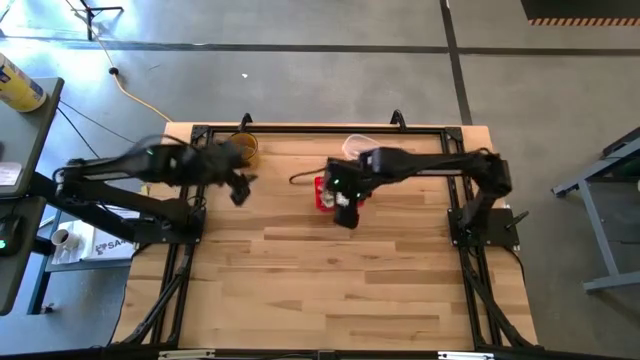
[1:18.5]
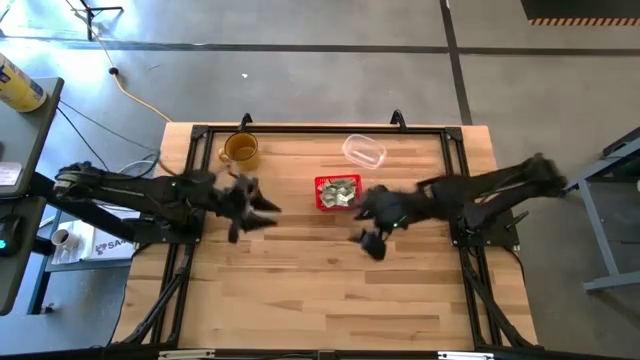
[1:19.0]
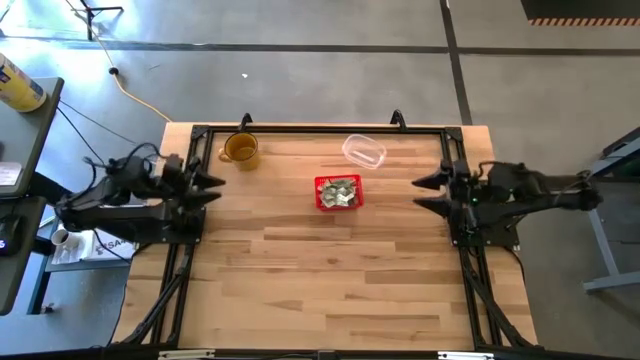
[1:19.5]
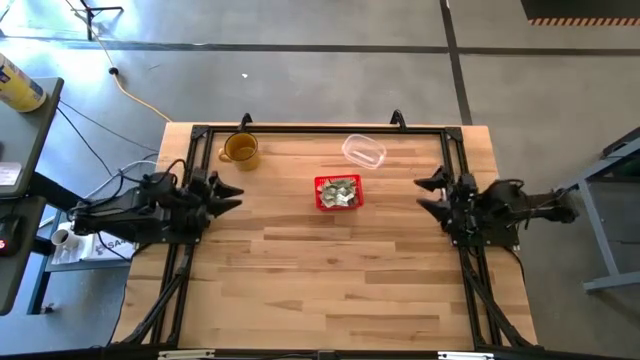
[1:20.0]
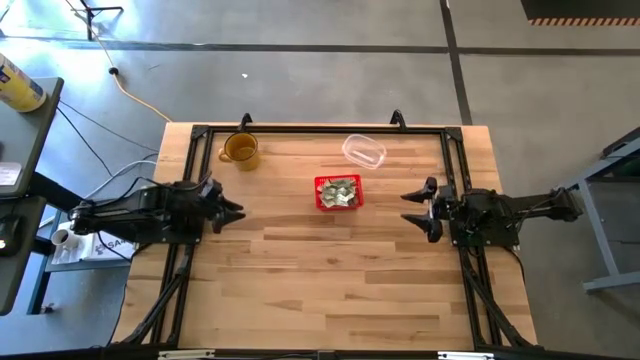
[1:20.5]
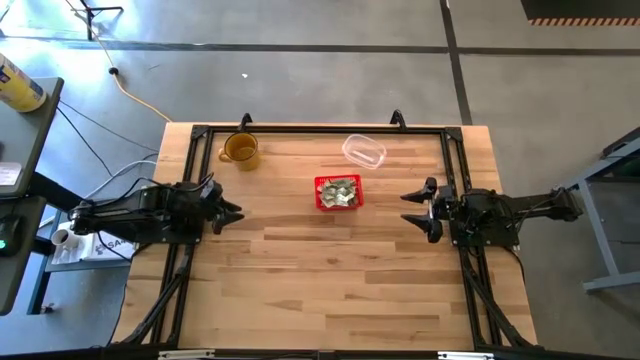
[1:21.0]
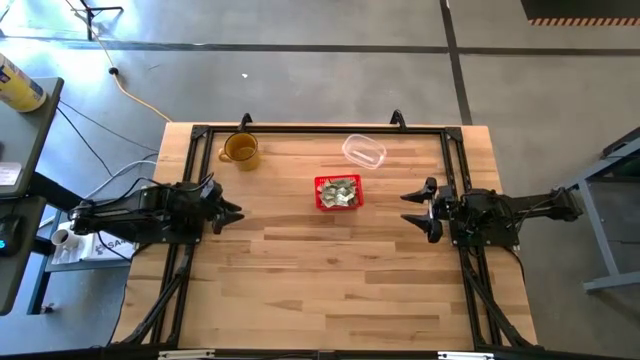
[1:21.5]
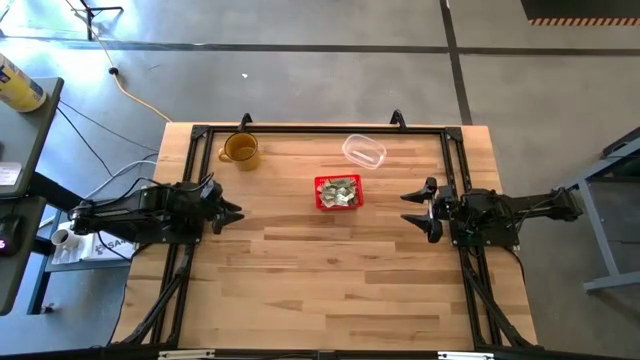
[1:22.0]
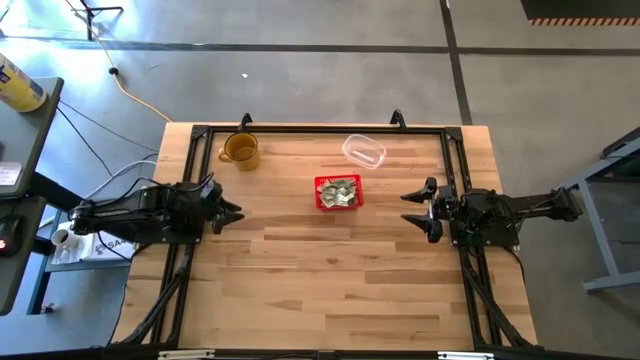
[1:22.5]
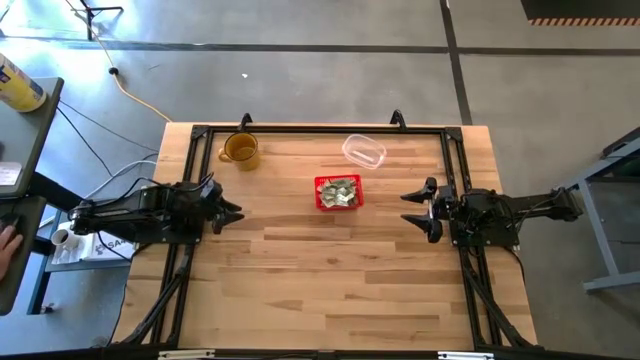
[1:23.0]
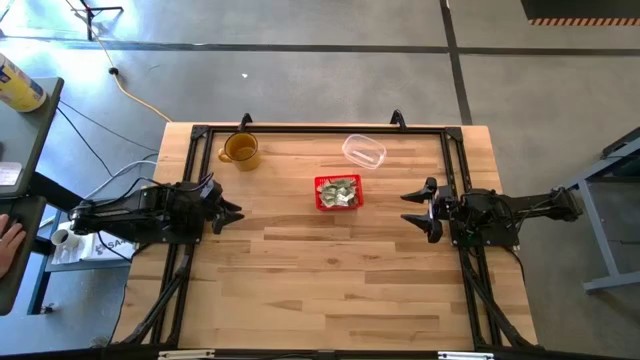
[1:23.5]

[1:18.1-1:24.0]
Task: Pick and place items into bin
Return to Home Position

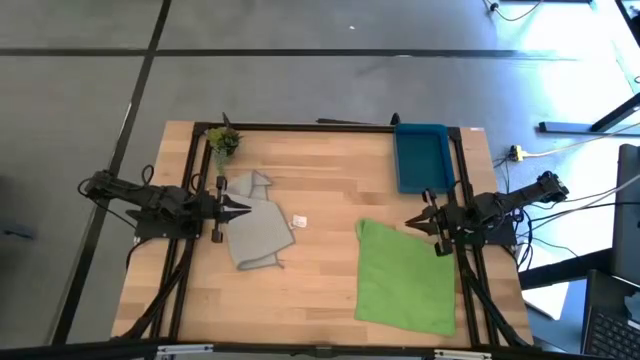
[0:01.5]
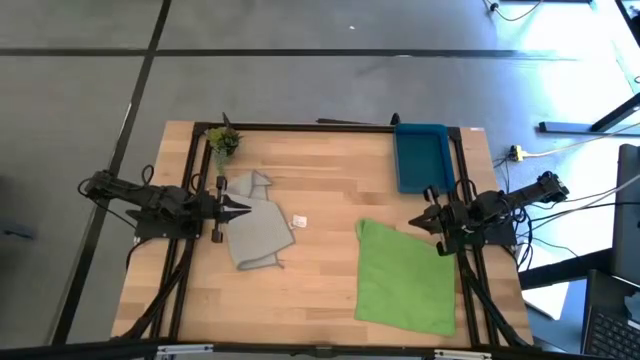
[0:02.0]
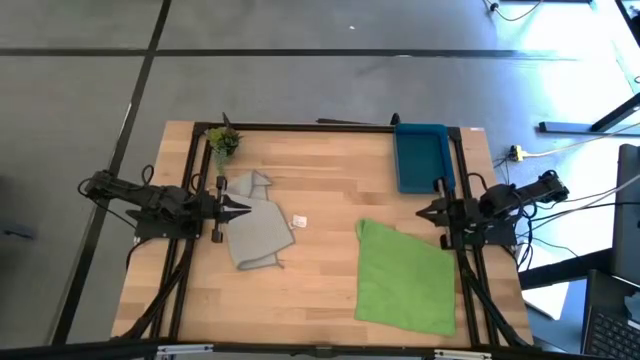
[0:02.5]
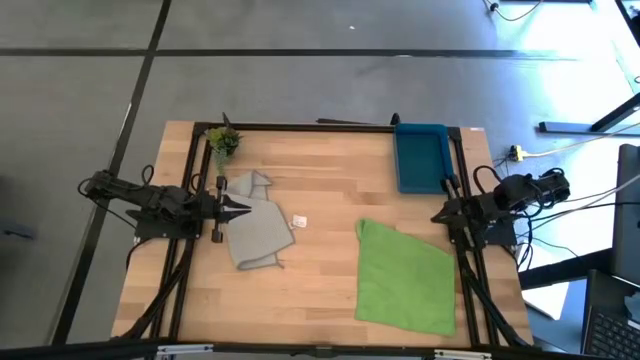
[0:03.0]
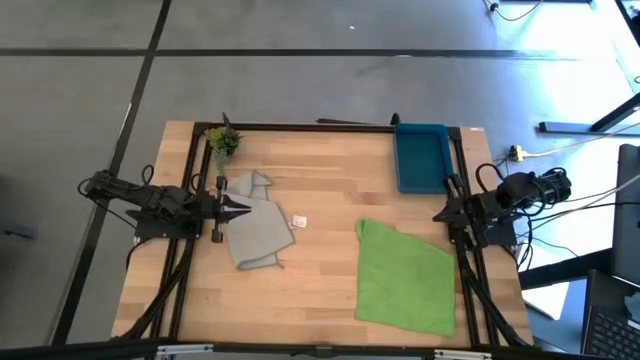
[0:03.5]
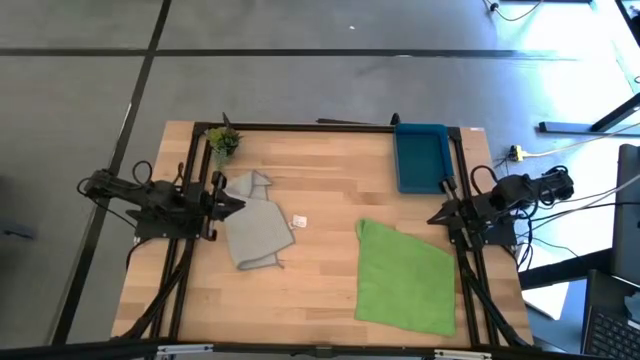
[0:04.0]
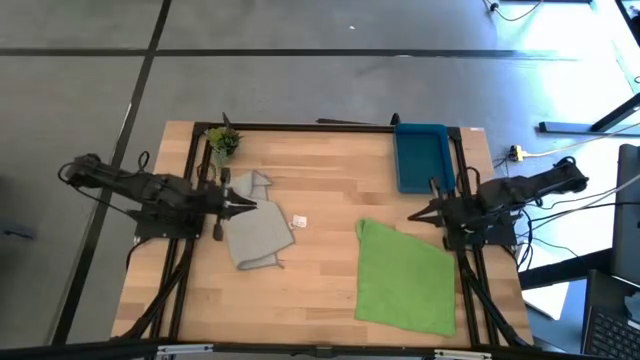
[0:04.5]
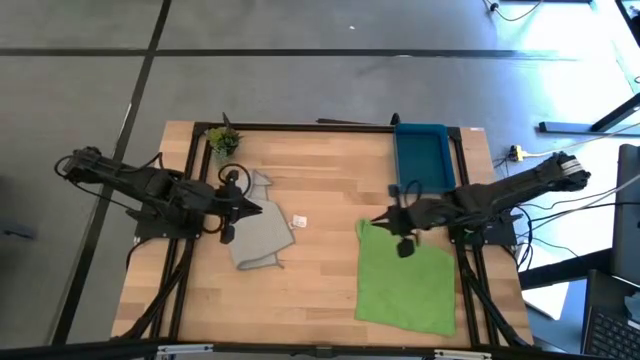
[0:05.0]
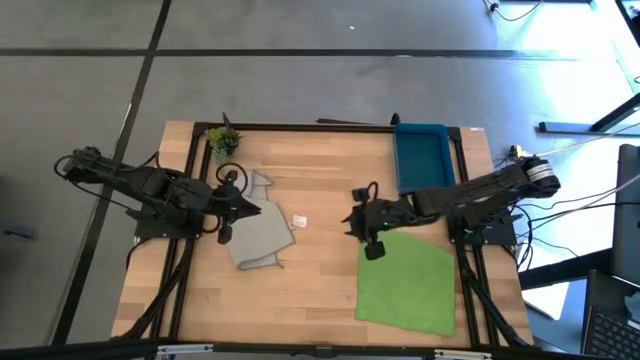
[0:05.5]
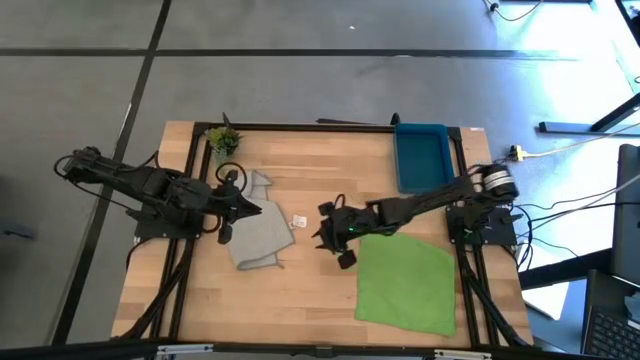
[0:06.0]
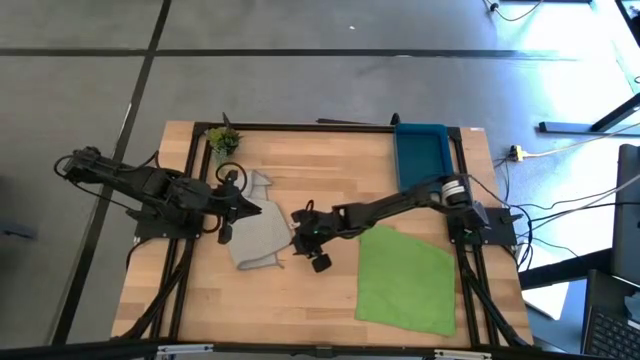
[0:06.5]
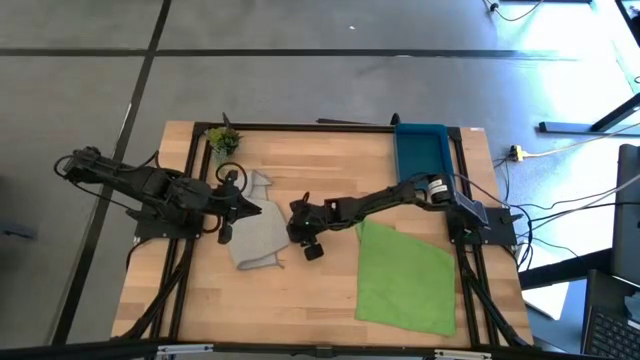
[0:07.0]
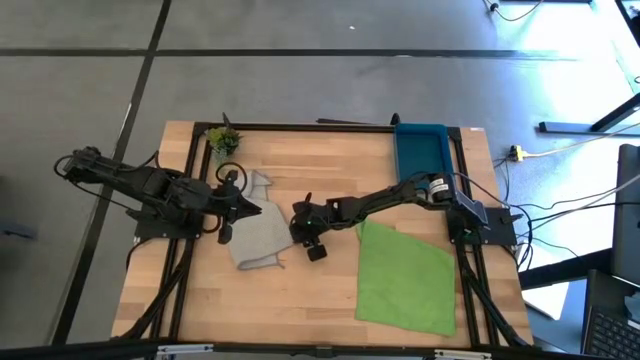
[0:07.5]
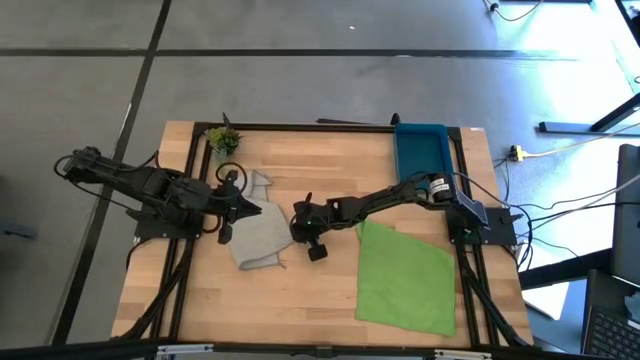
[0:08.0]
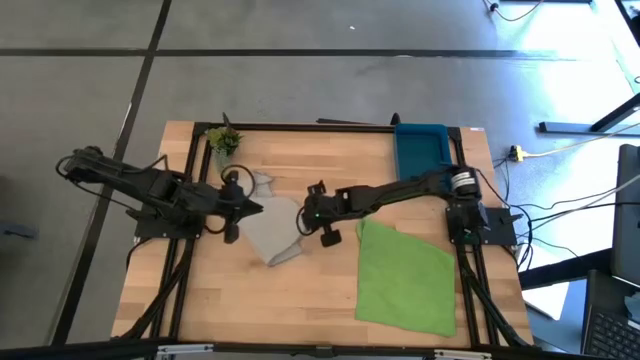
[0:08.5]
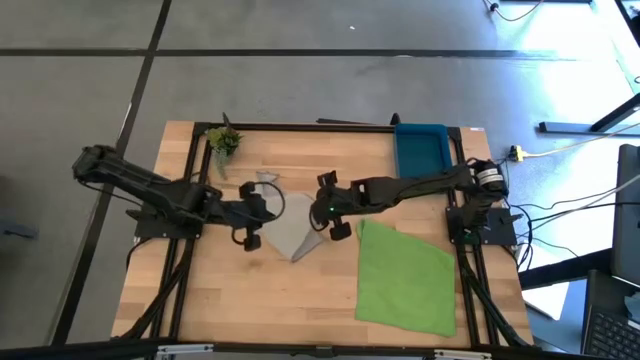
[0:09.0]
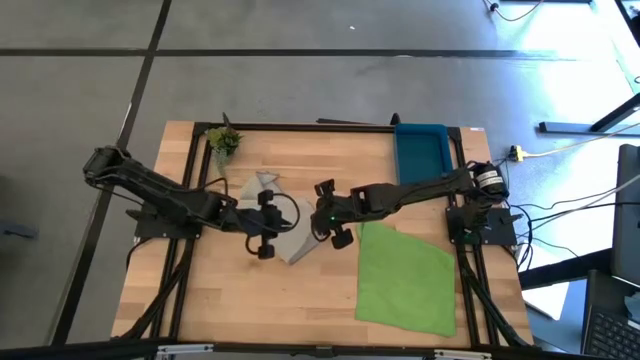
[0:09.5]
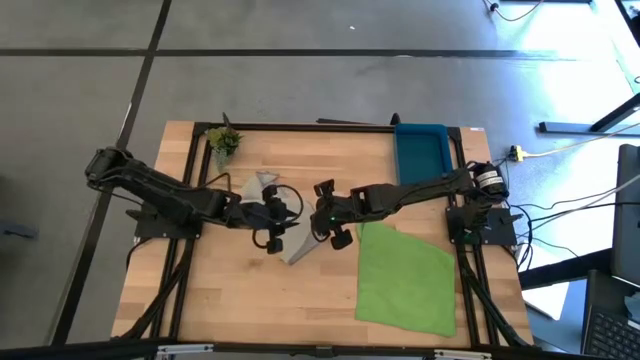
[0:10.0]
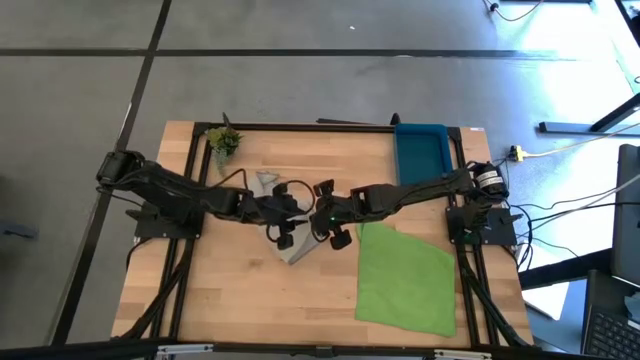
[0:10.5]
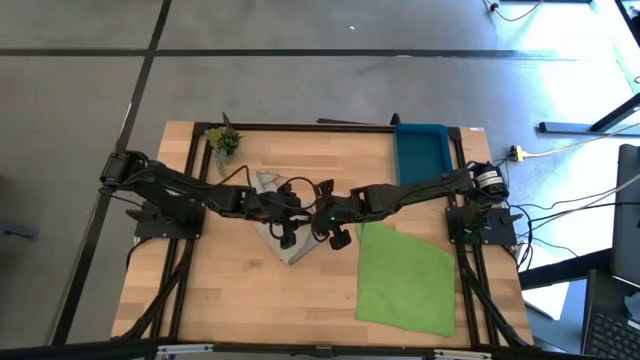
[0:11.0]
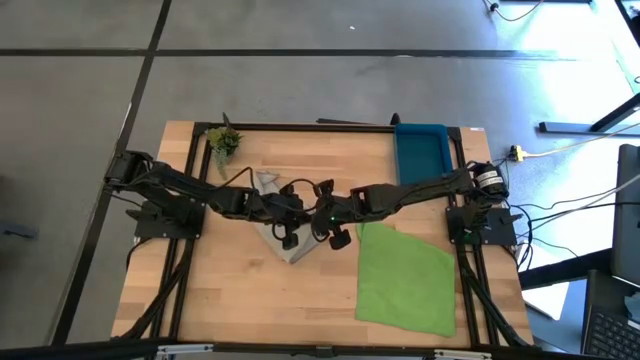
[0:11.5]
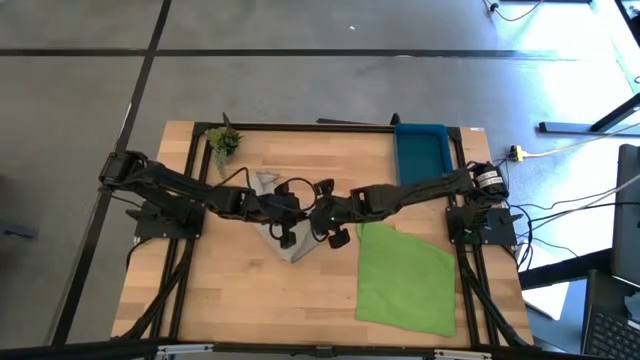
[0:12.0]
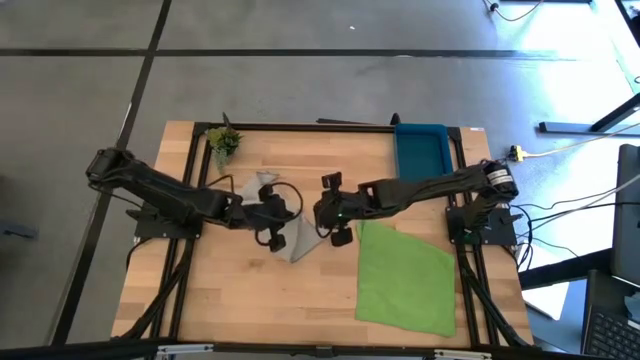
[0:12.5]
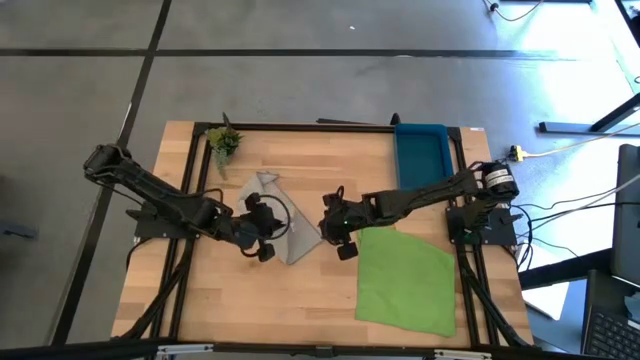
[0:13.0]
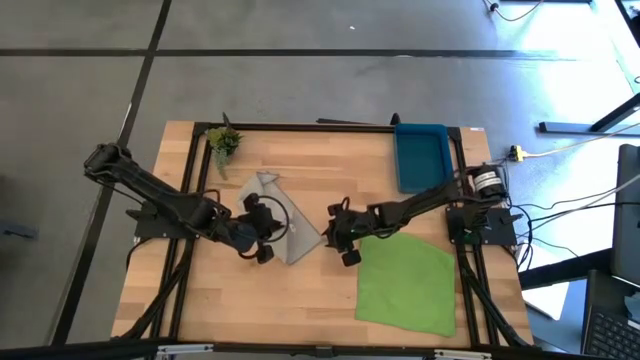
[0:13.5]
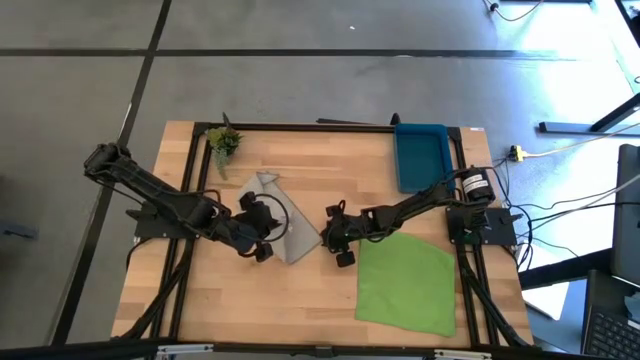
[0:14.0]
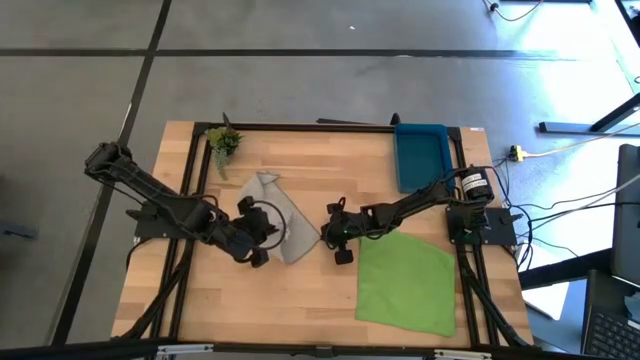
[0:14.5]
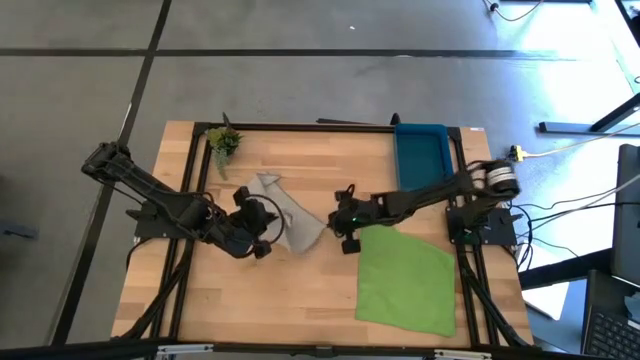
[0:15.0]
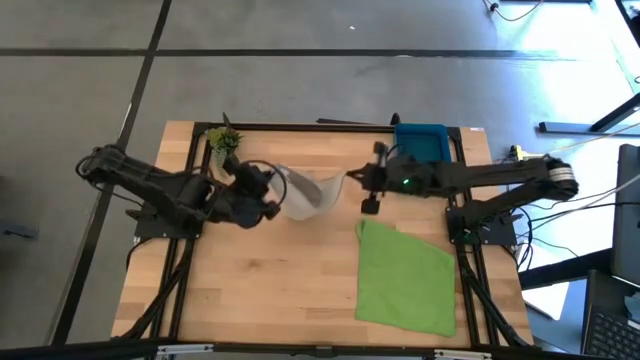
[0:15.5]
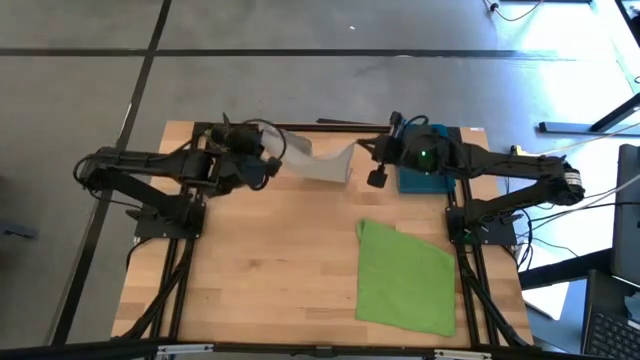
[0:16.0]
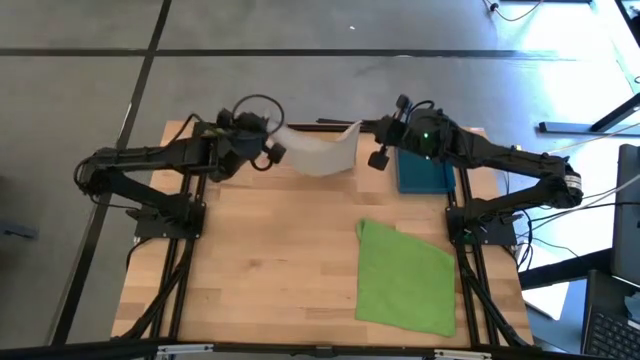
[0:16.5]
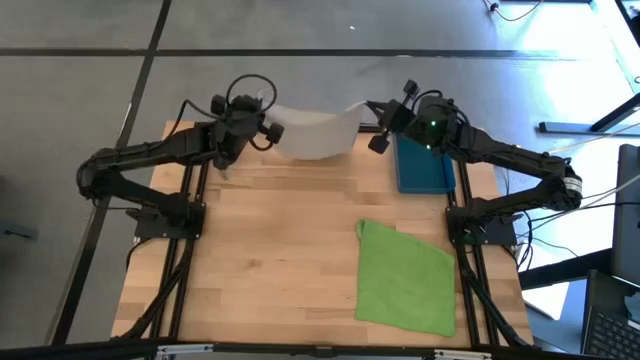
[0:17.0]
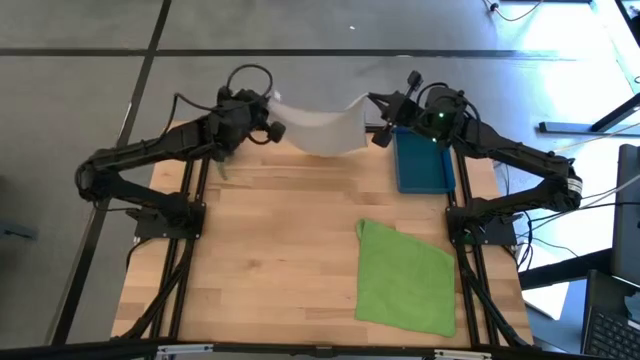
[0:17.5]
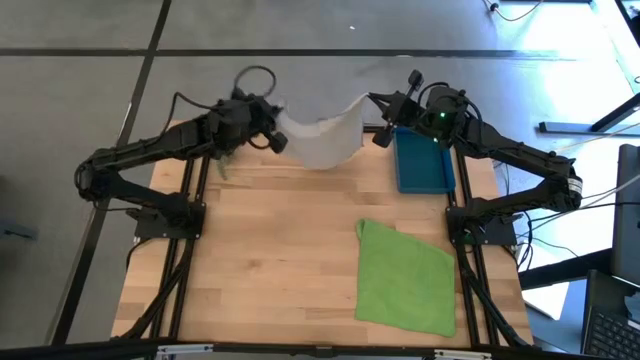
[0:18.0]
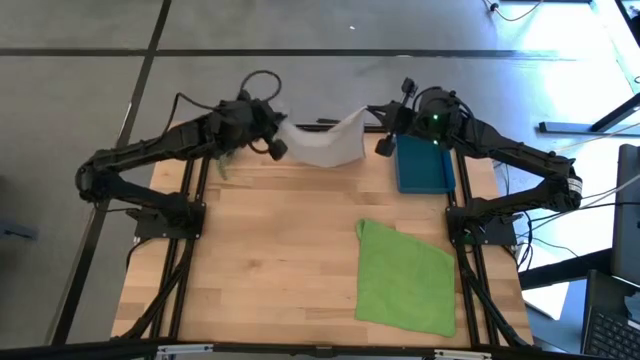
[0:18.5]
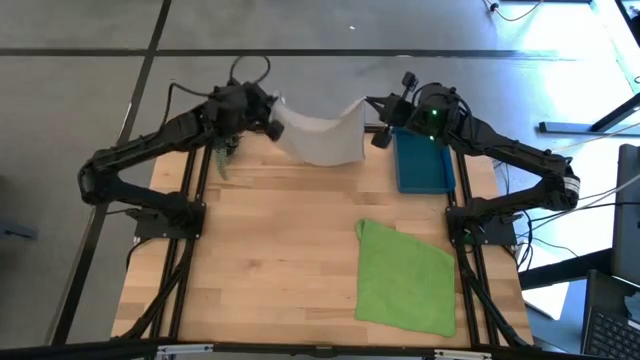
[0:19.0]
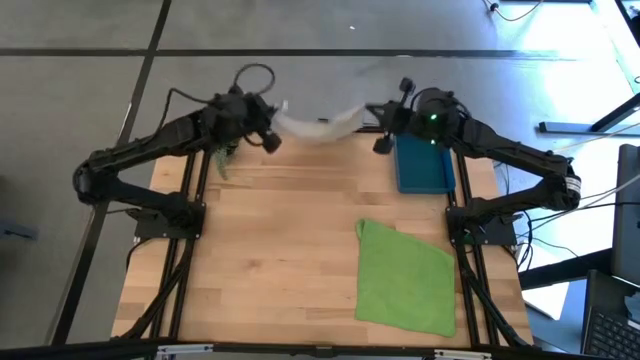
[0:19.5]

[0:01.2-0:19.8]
Task: Roll microfiber towels into tight, uniform cylinder then place into a basket
Roll the gray towel
